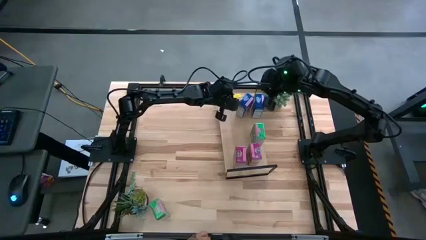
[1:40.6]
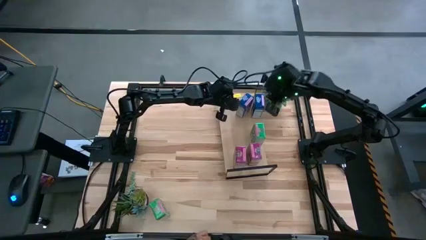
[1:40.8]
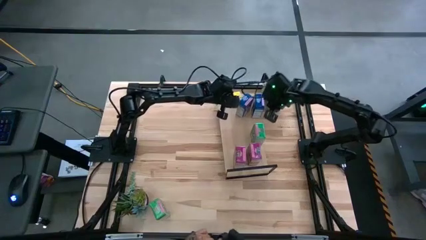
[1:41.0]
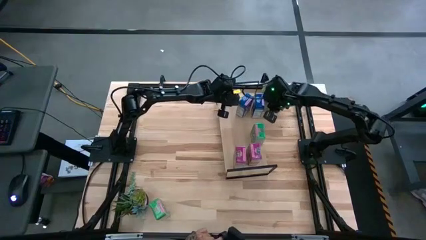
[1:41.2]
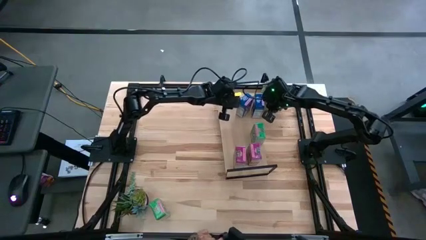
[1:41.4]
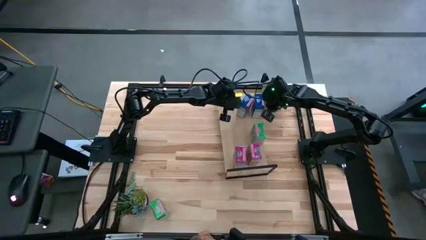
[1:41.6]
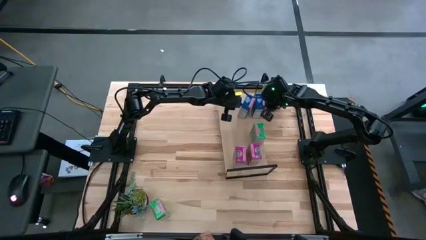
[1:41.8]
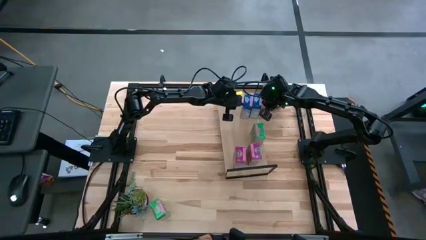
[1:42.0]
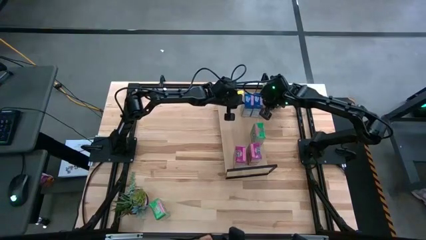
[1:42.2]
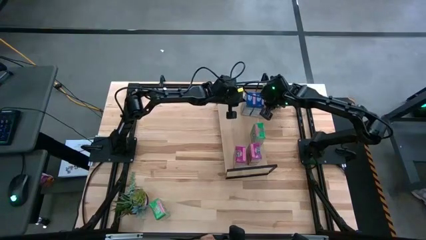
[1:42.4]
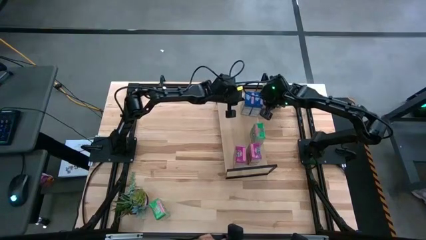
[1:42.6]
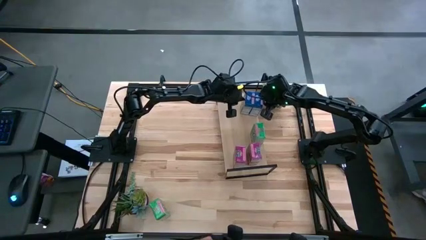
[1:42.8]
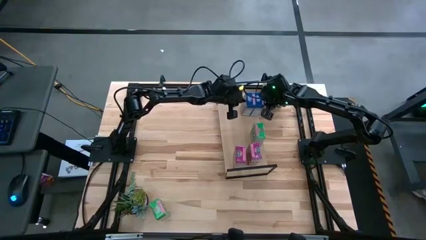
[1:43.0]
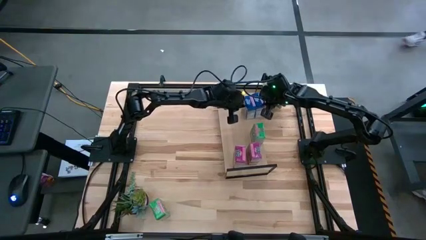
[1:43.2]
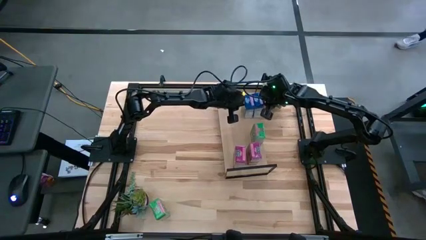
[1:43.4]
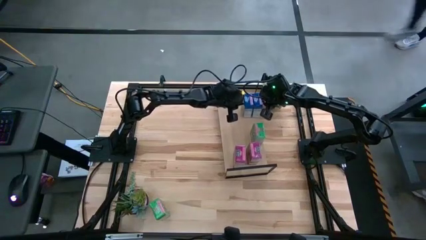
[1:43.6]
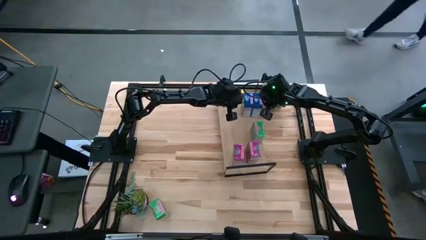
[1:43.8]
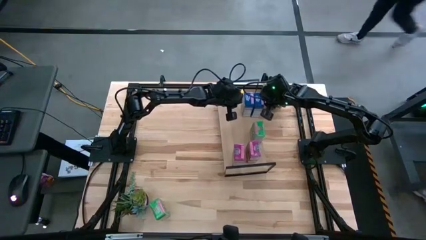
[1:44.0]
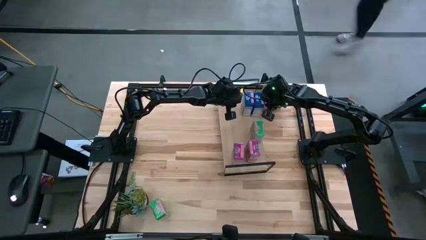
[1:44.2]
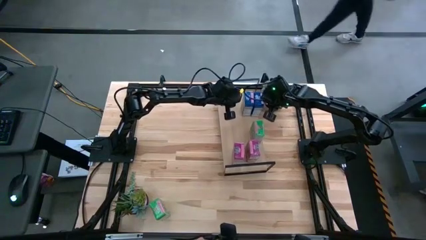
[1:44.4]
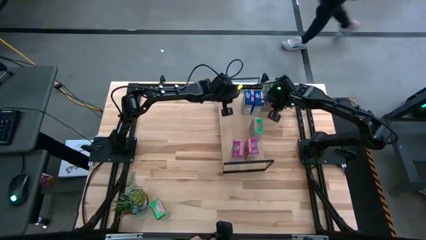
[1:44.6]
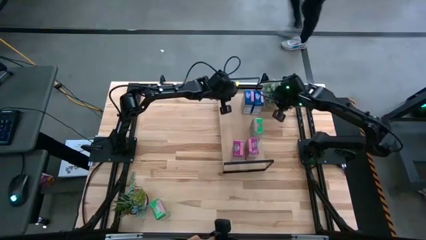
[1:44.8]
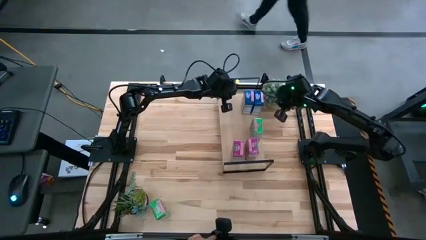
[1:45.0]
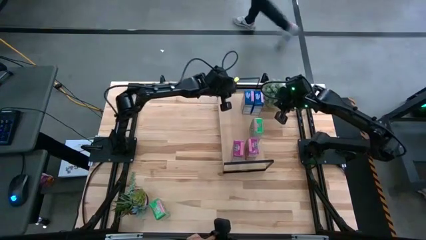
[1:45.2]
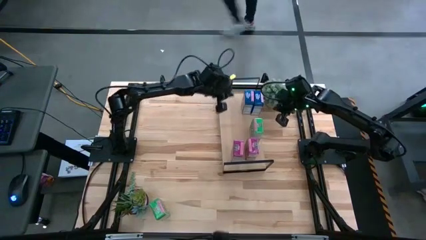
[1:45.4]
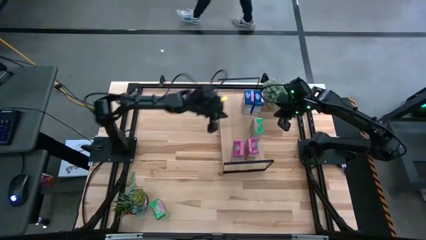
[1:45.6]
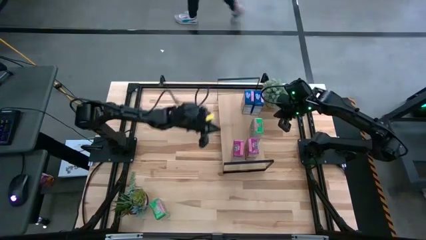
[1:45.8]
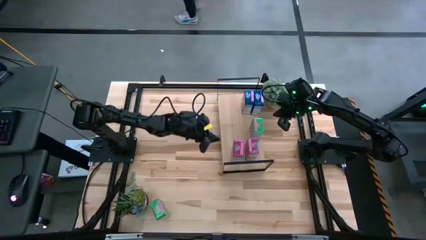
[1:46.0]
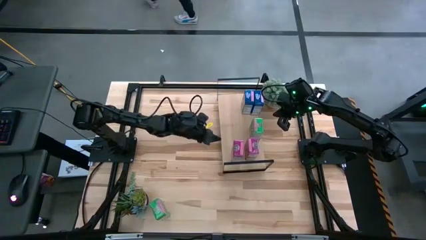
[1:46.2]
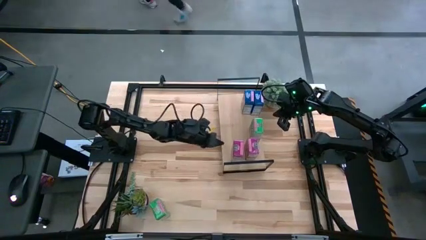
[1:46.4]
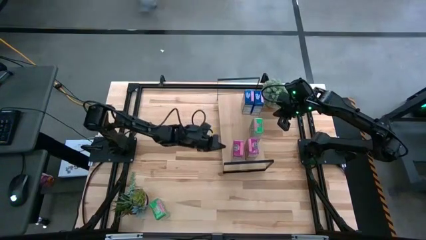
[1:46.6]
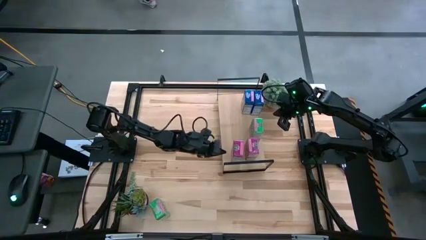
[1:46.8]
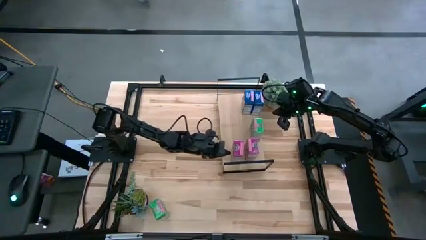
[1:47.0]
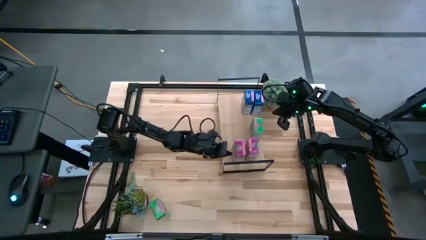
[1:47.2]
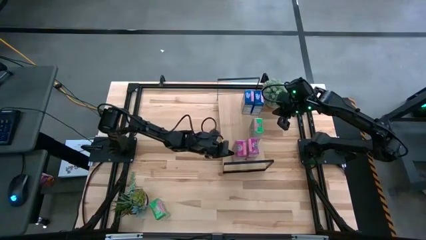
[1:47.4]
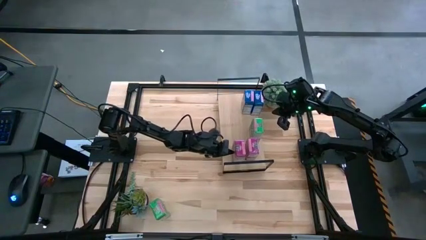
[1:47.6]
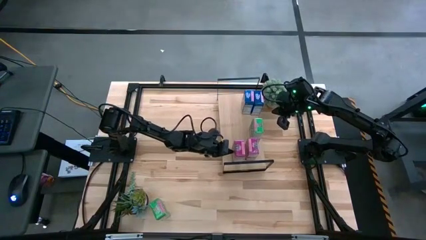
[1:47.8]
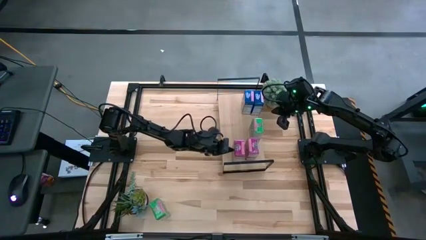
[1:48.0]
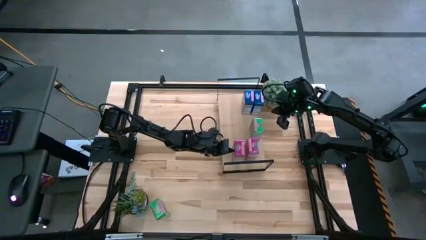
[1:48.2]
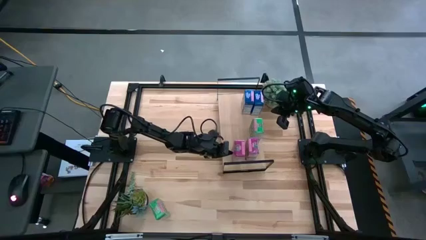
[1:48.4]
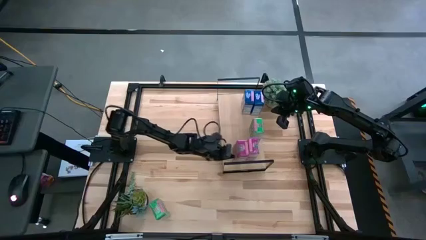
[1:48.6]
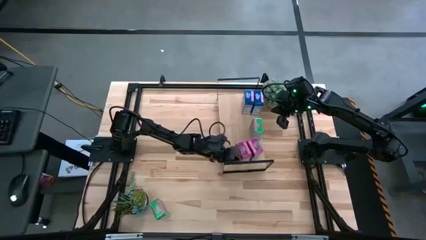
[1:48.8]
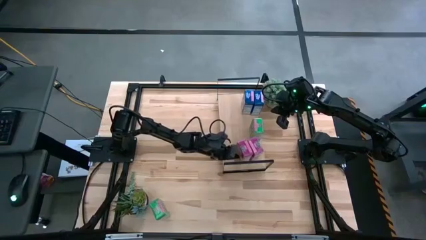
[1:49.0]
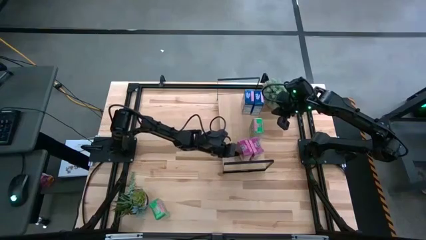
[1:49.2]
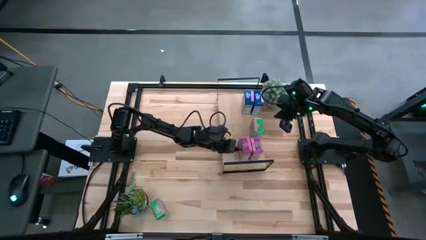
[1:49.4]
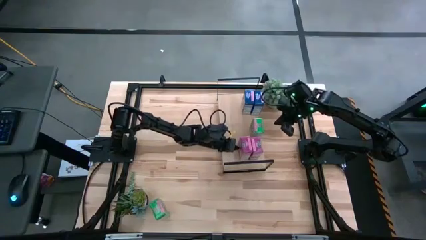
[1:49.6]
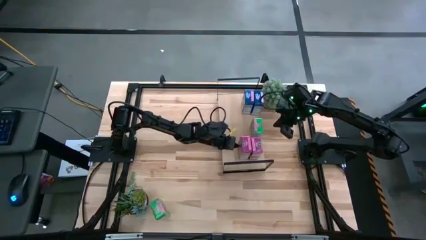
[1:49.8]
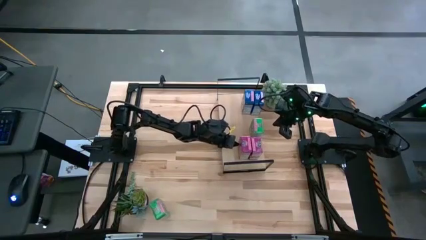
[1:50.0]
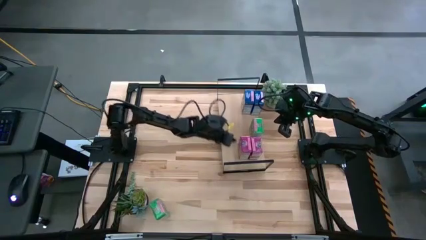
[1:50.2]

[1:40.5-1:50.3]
Task: Stack cereal on shelf
Adjust the cereal boxes on the shelf

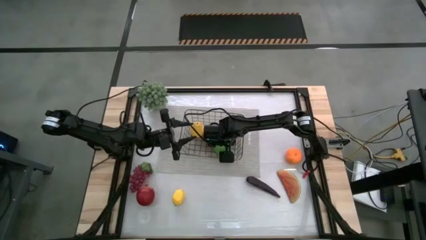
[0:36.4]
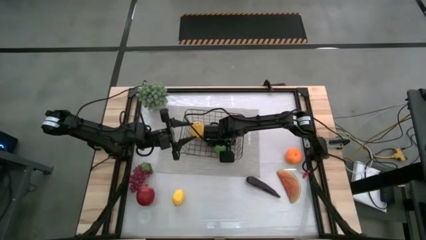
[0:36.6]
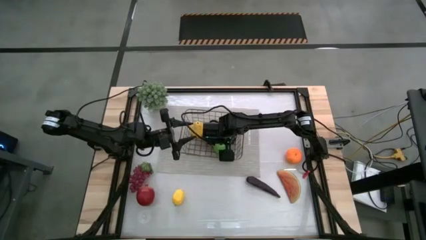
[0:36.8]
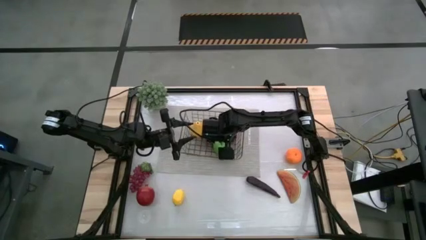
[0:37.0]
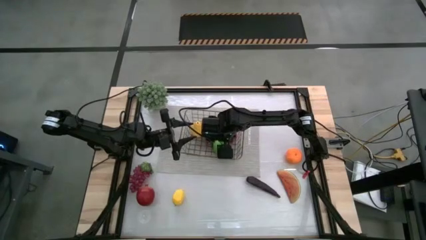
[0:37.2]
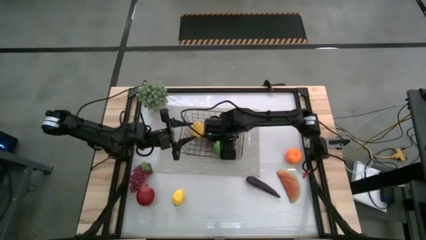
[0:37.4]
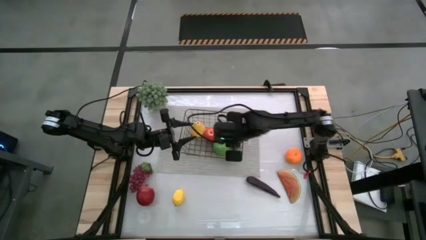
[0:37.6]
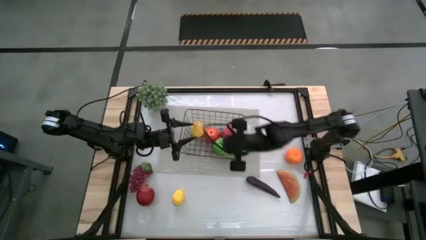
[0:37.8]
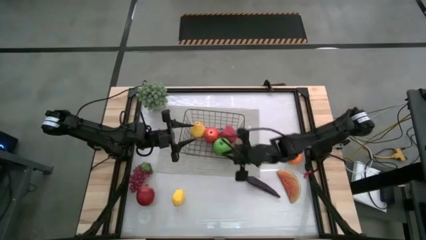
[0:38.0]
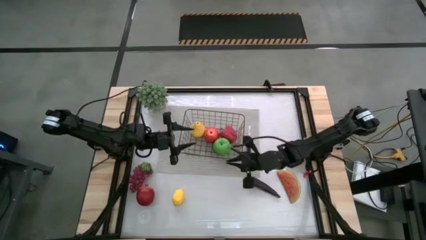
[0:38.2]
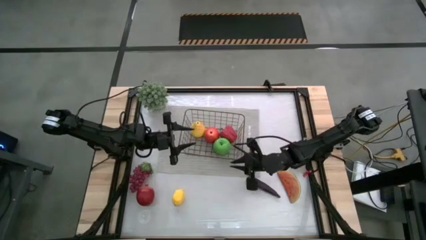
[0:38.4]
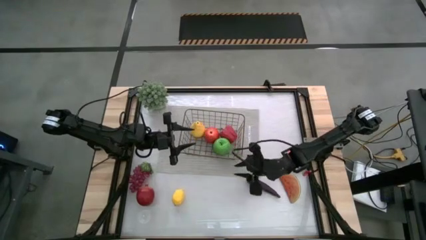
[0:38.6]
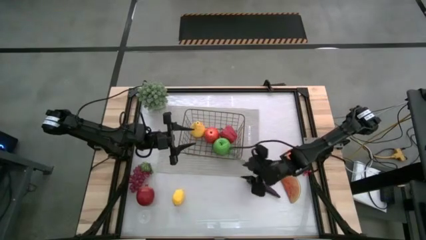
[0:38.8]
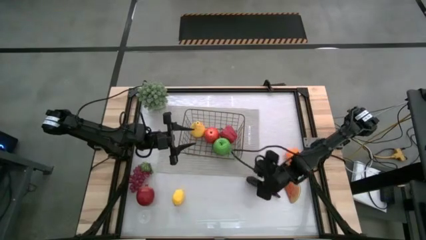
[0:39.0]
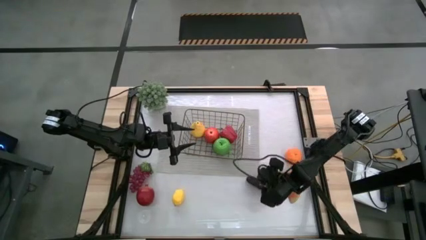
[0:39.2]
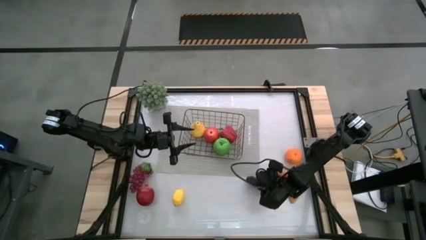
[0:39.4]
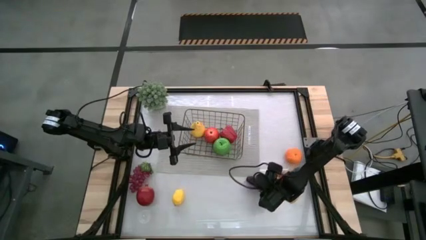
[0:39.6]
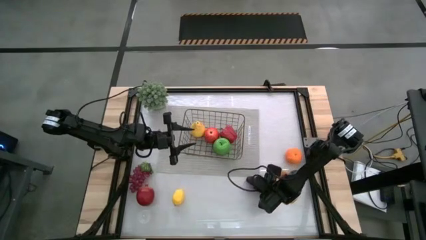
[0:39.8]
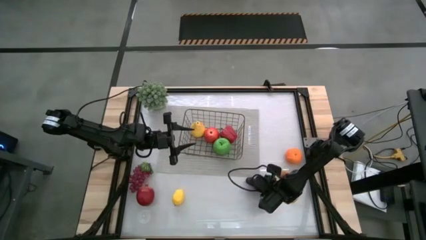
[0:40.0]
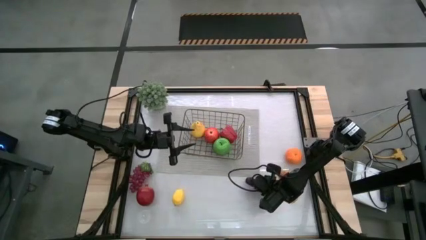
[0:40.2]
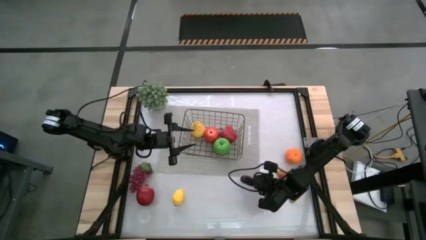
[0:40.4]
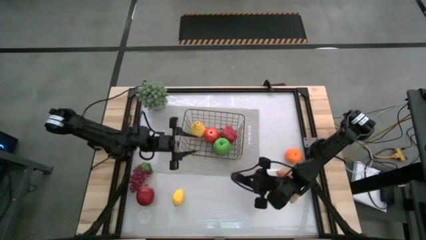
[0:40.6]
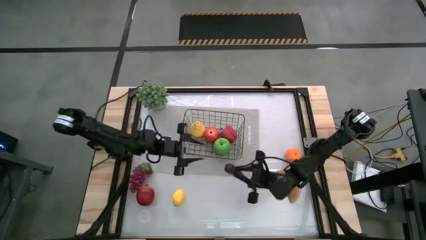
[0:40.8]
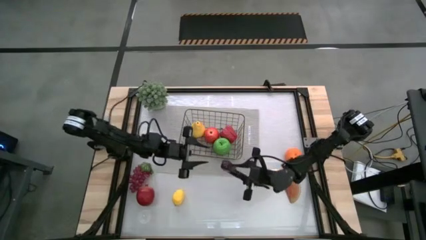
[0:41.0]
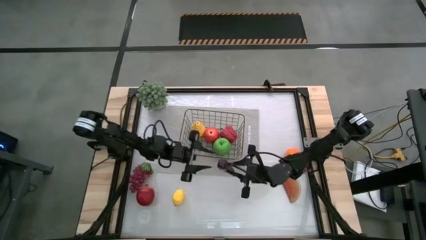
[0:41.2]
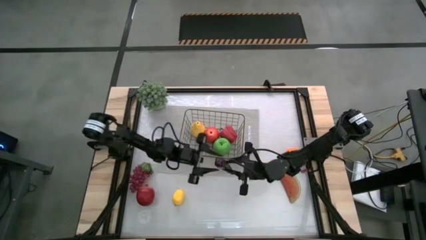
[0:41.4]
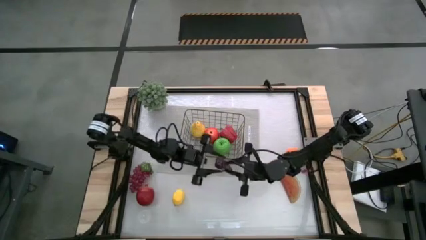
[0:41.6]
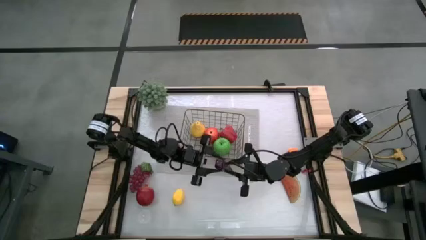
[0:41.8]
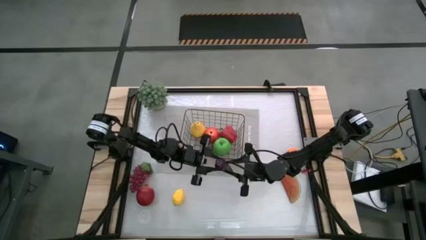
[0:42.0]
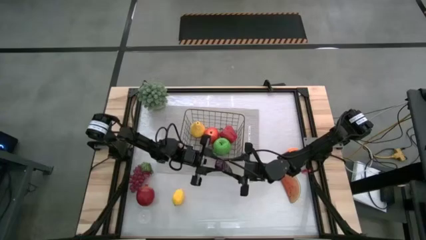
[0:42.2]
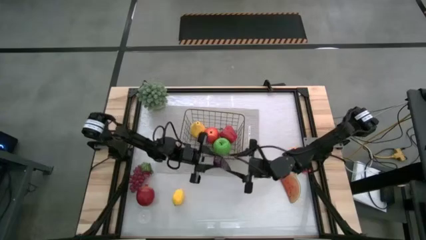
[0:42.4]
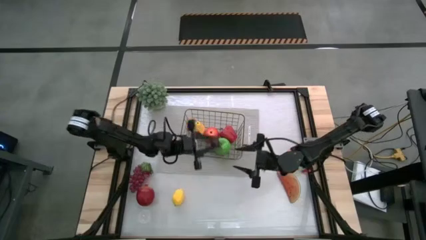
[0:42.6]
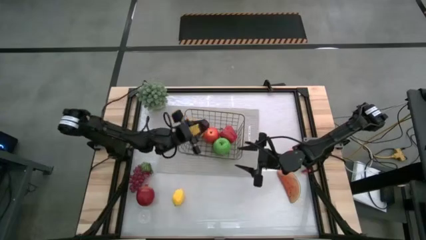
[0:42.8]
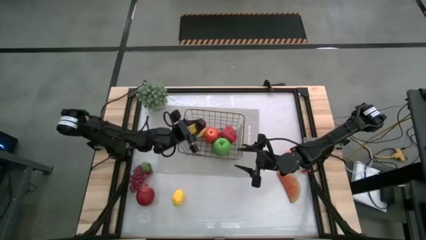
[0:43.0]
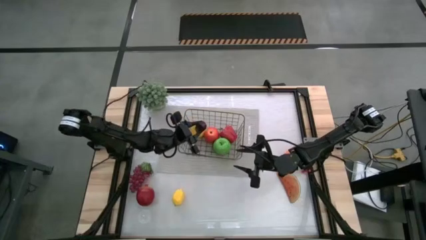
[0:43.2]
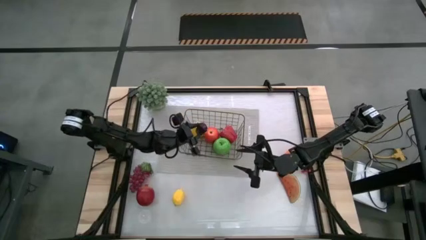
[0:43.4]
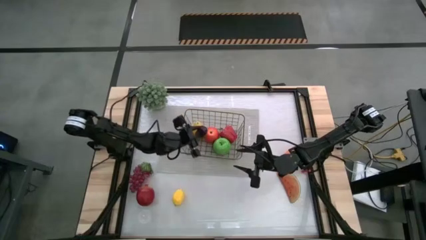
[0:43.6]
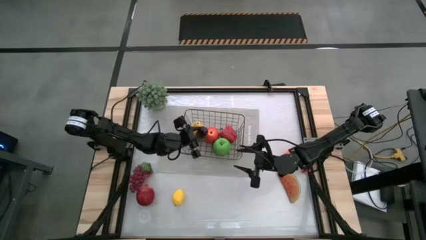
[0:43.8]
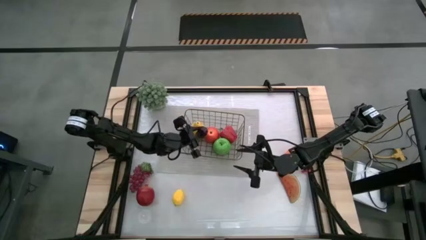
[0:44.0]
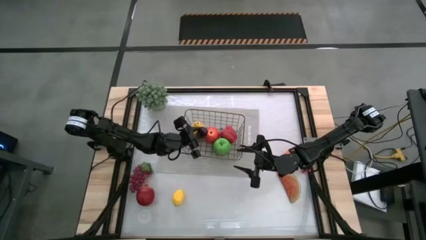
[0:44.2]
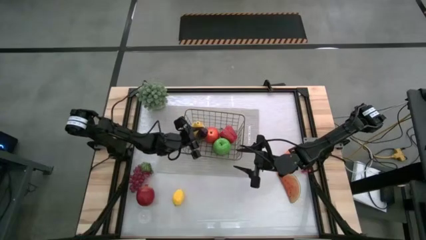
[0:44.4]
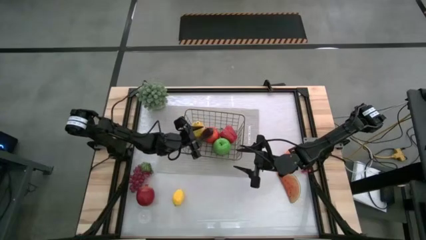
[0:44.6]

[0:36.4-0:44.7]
Task: Build produce basket
Put the eggplant into the wire basket
